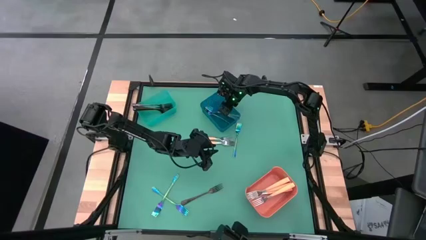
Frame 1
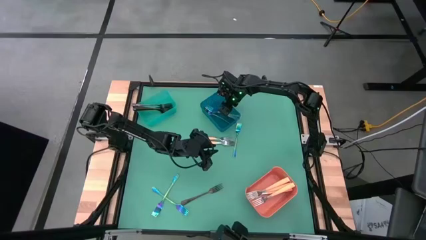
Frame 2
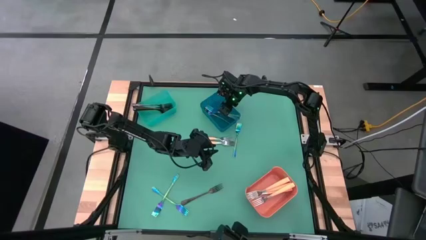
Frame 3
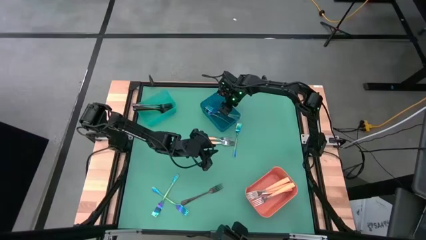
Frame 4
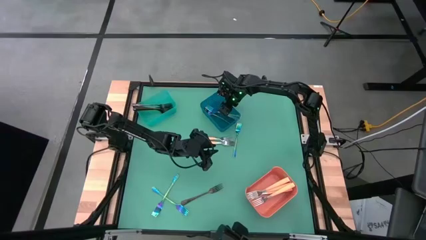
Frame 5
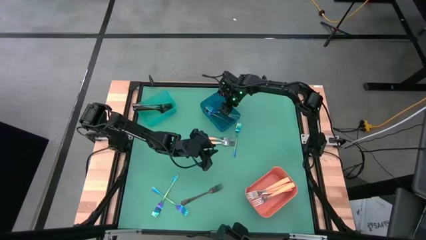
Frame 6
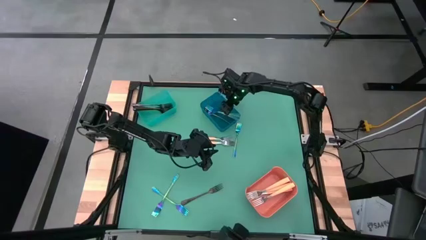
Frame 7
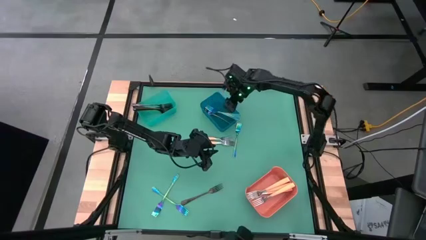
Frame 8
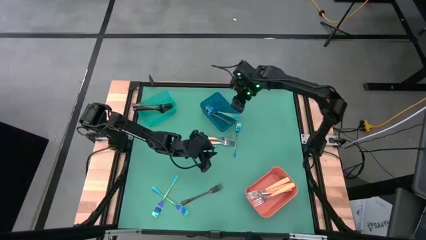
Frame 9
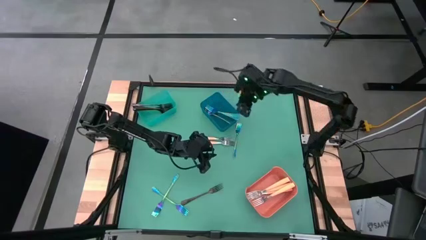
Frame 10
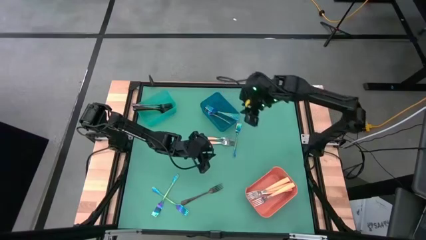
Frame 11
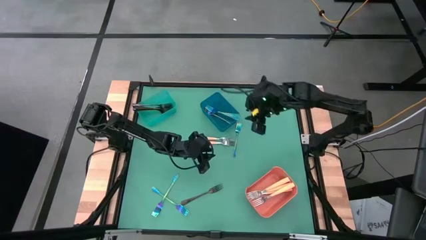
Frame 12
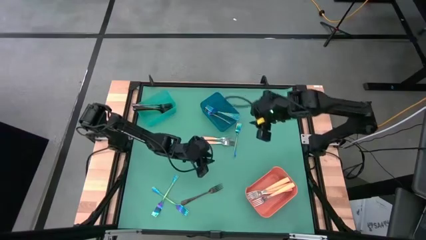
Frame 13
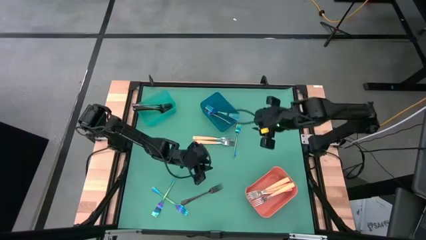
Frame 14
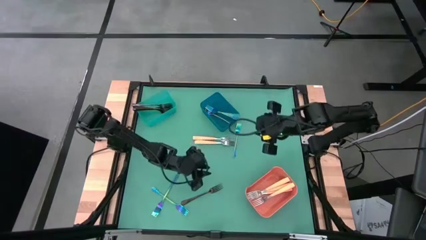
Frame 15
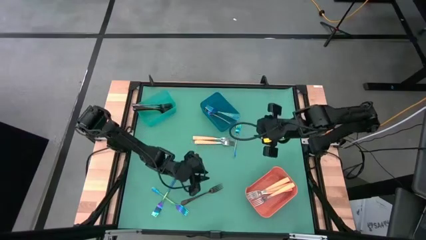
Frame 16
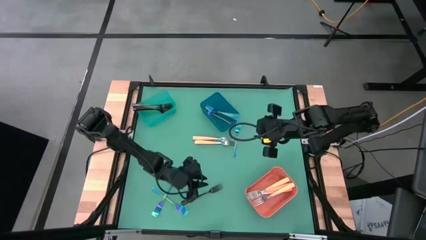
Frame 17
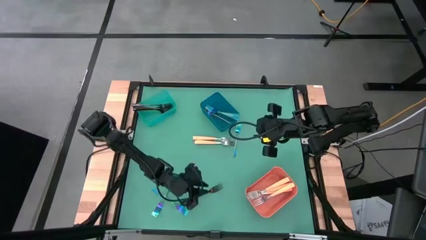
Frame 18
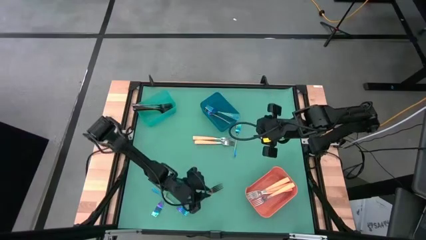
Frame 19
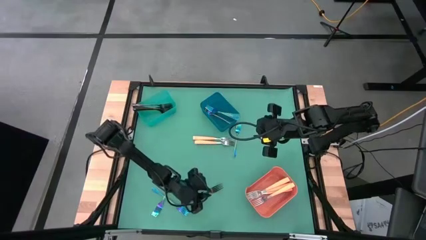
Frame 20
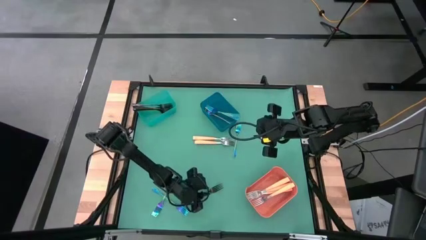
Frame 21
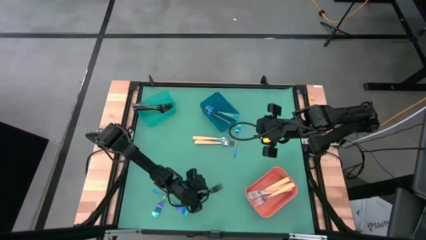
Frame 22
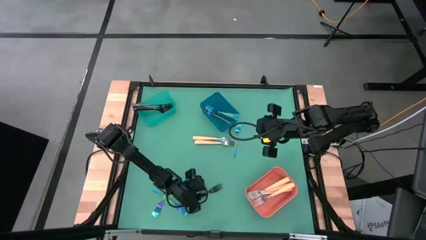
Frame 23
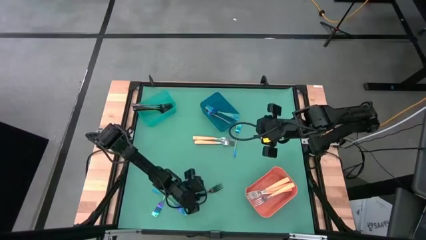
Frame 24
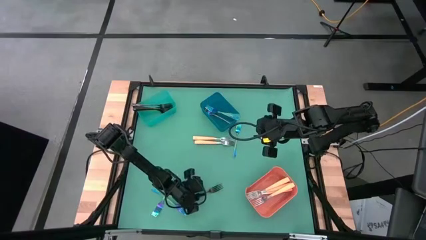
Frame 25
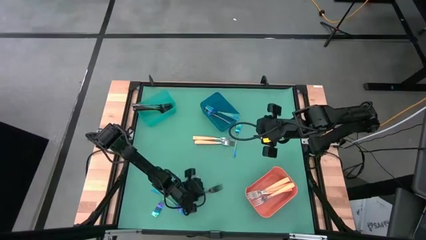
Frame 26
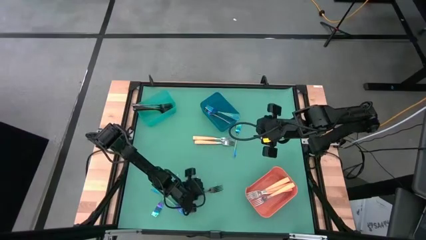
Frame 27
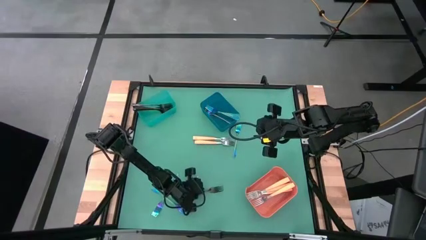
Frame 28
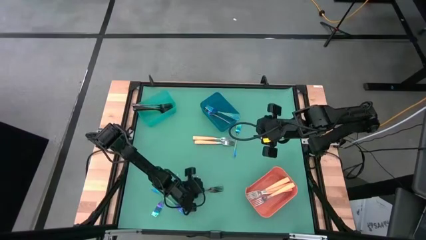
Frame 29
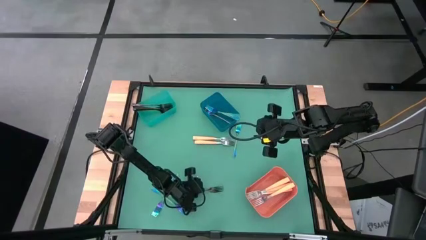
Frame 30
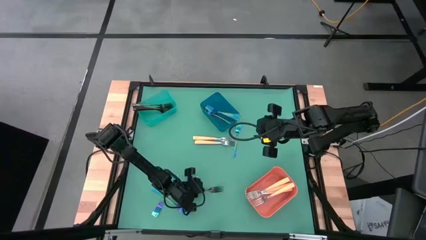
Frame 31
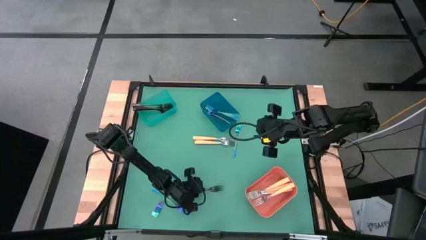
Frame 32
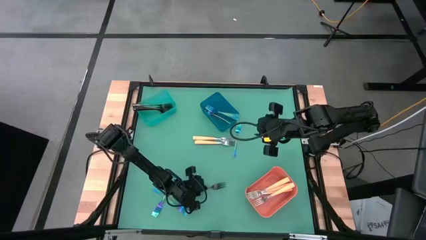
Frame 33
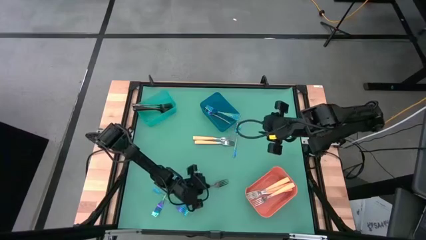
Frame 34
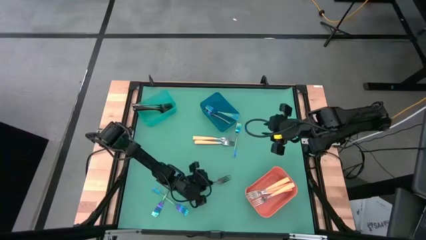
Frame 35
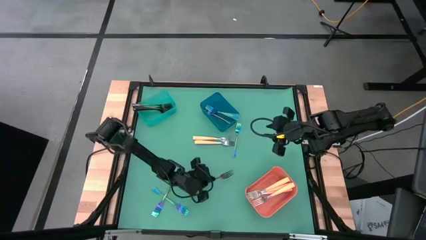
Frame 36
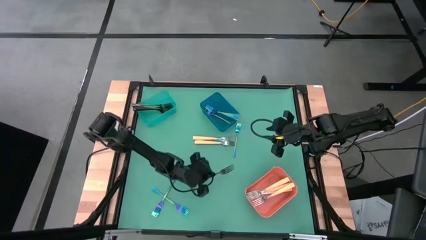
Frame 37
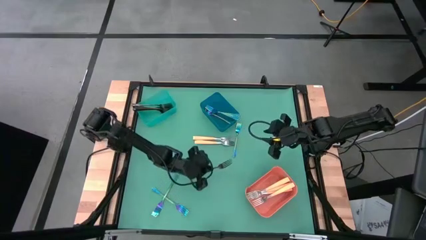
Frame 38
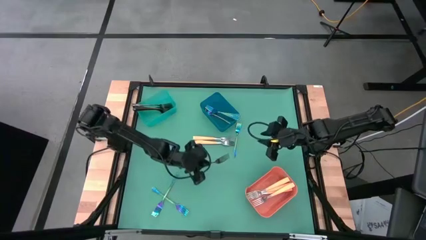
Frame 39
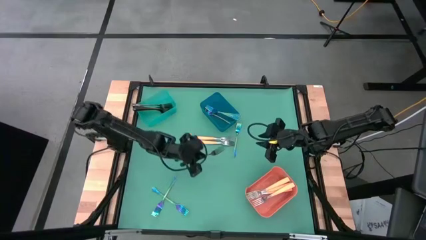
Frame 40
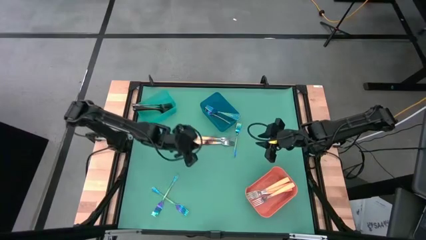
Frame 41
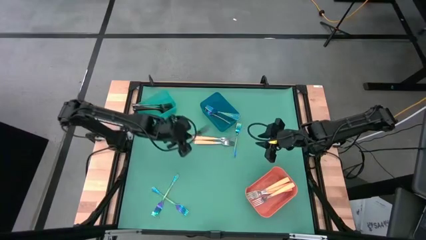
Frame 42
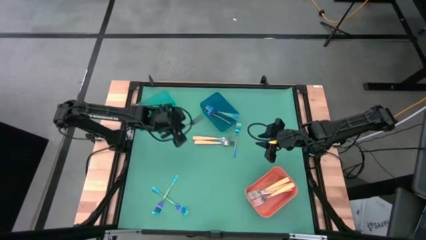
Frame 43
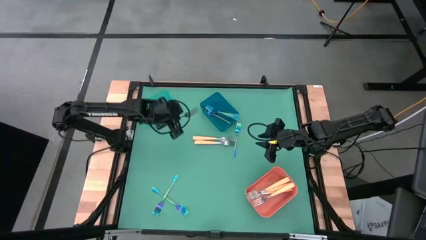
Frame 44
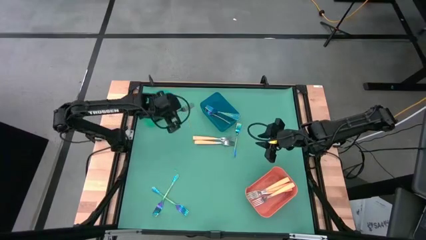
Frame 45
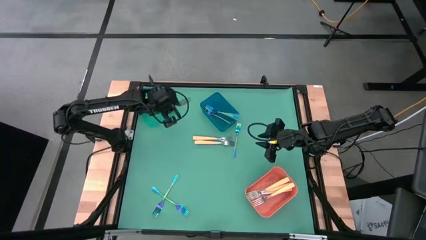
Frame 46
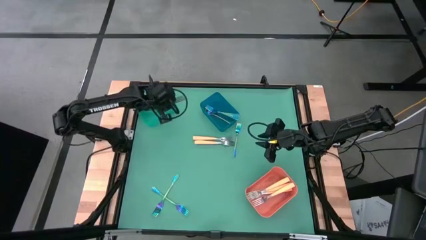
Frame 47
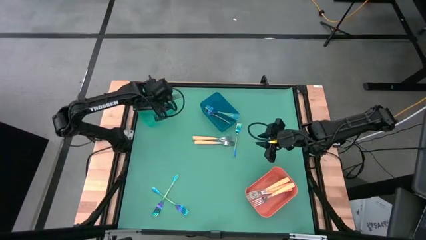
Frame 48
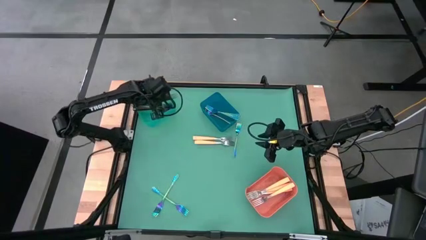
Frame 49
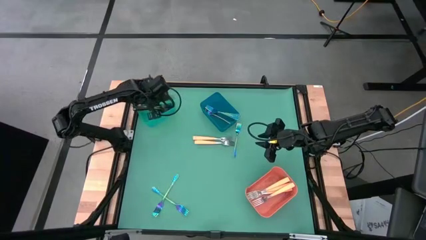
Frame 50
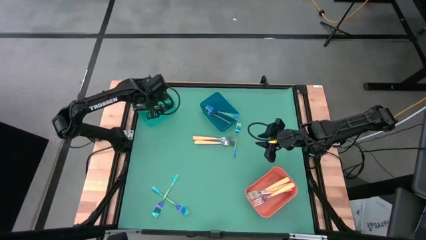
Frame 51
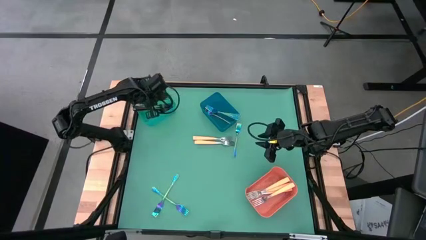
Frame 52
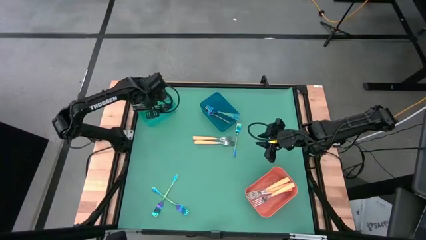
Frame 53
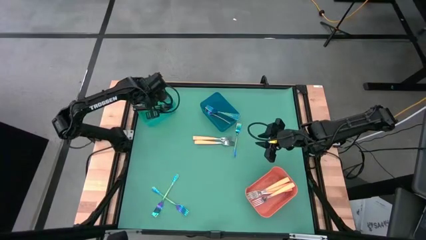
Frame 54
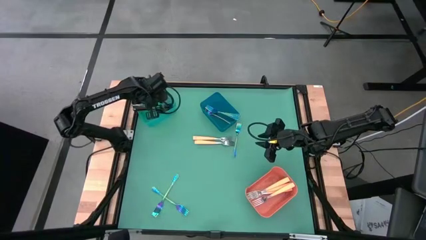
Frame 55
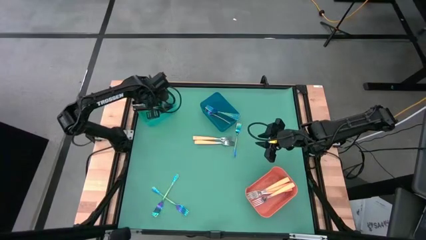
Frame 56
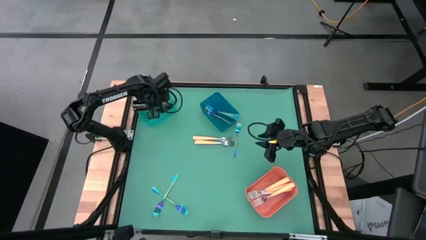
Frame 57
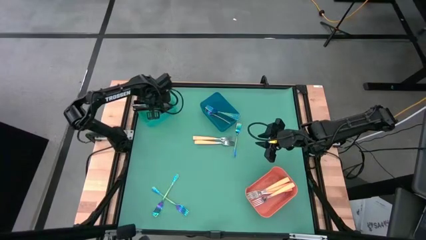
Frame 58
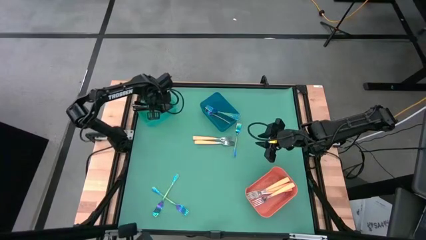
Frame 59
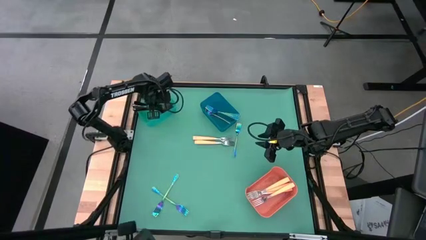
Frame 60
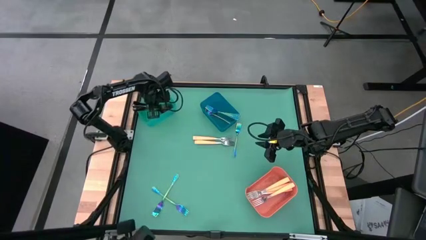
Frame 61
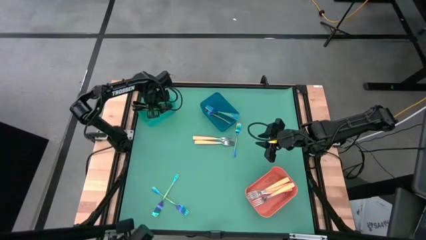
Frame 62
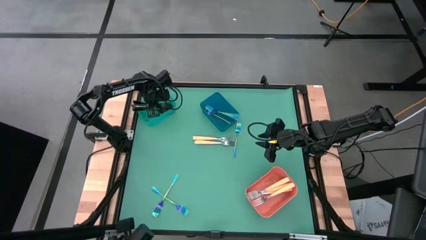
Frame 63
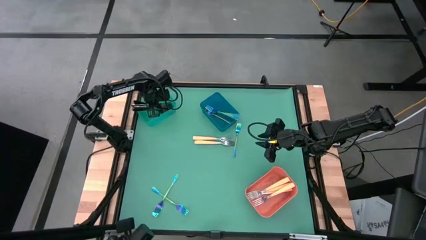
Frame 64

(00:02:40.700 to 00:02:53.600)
Task: Sort silverware by color (type)
Put the black fork into the green bin

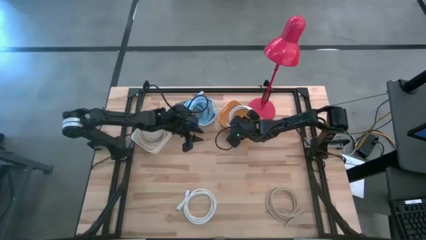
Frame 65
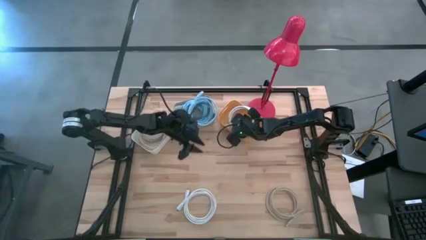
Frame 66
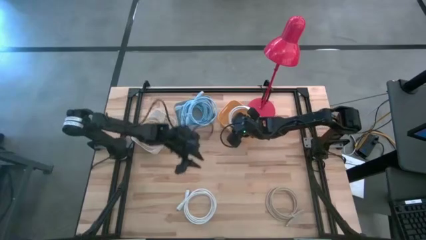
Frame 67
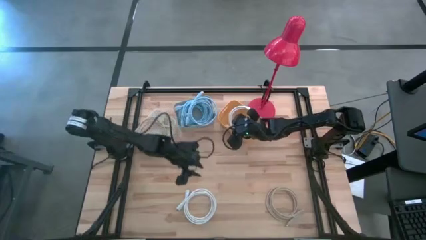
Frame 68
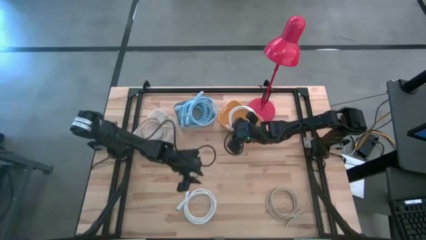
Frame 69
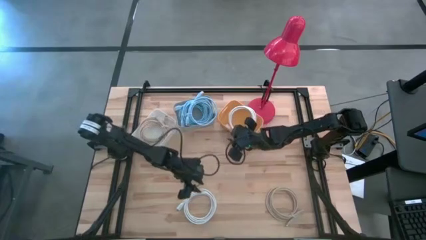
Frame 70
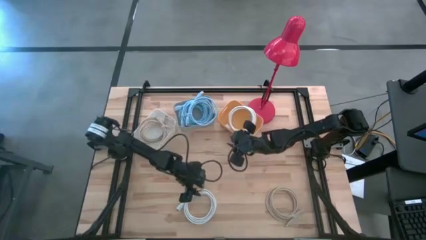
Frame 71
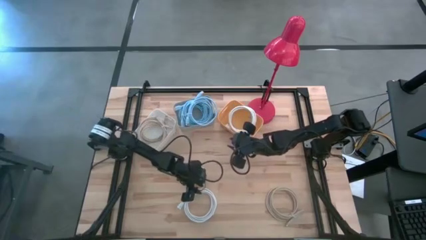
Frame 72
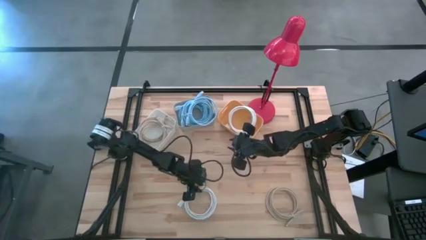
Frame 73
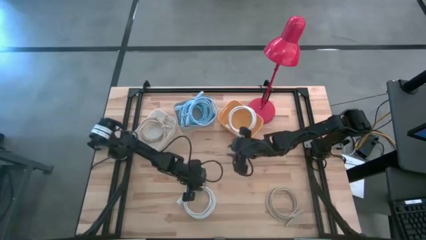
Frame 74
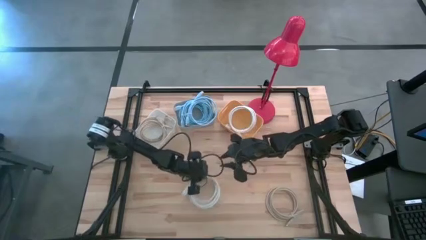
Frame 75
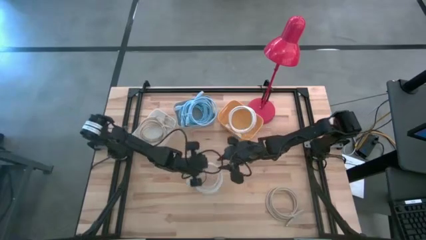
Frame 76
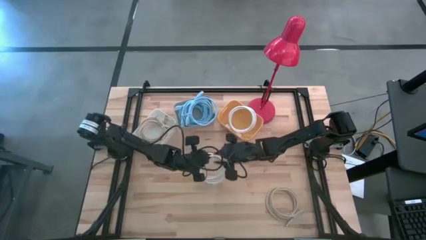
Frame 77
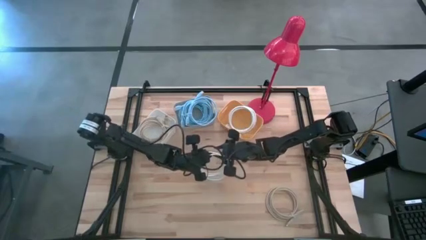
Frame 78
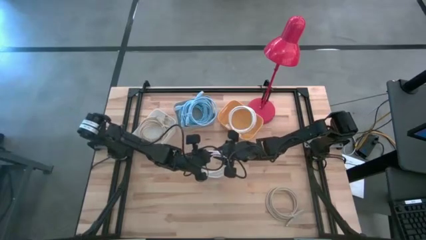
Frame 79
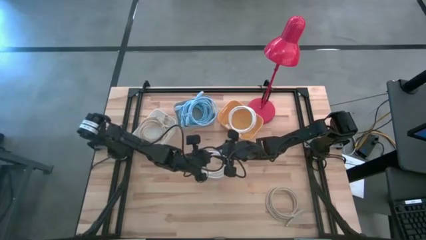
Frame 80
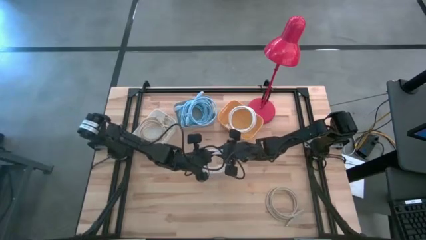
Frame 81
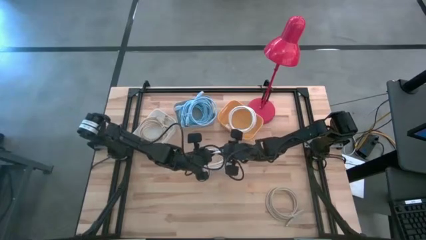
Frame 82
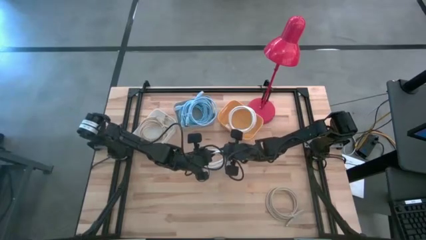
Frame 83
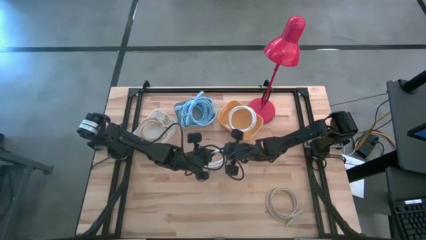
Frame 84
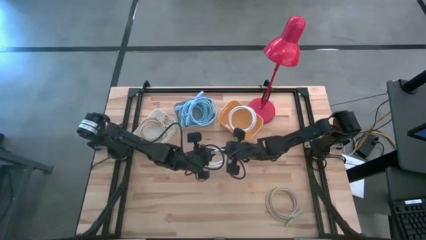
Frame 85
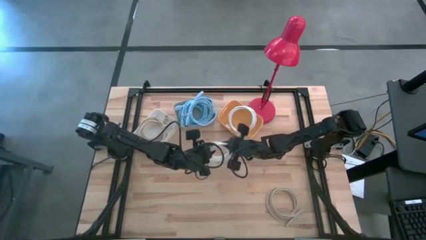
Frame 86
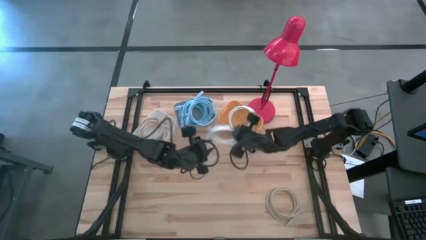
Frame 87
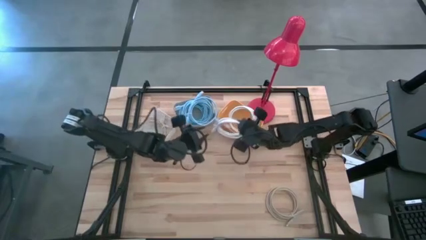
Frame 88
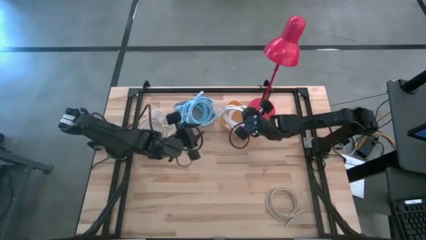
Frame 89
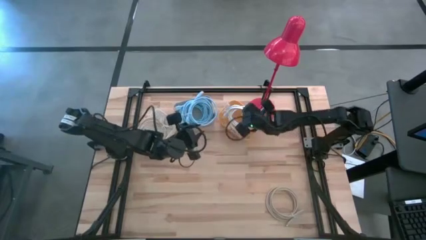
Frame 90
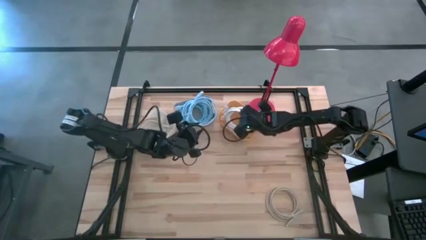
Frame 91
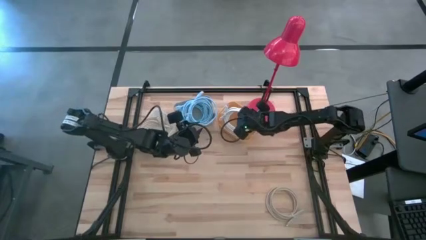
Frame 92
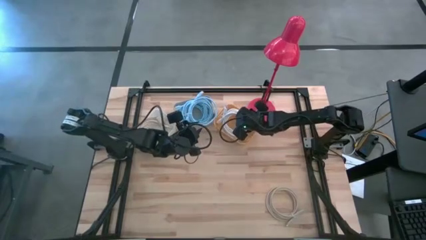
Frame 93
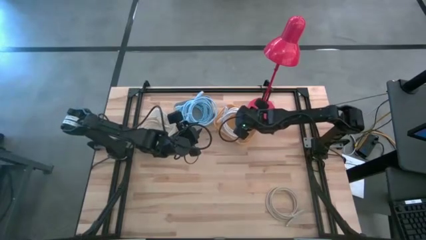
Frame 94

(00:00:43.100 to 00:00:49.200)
Task: Sort HDMI cables
Put the white hdmi cable into the yellow bin
